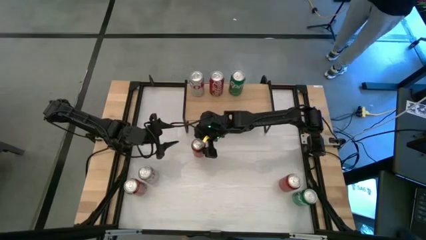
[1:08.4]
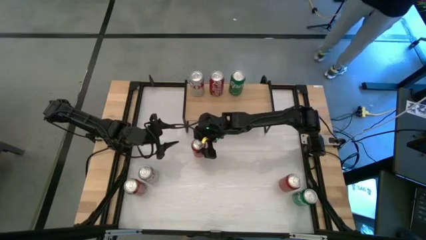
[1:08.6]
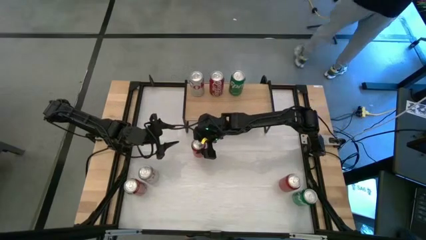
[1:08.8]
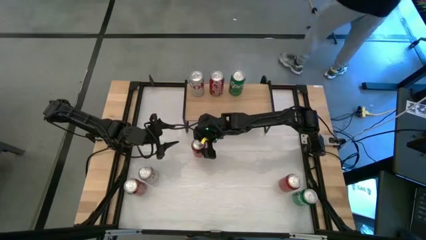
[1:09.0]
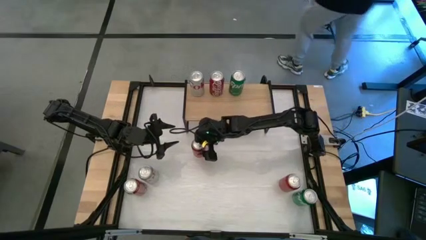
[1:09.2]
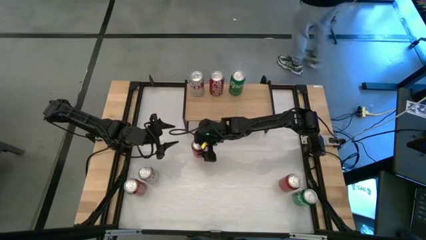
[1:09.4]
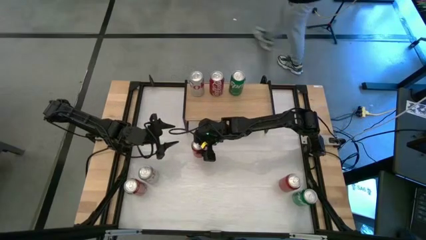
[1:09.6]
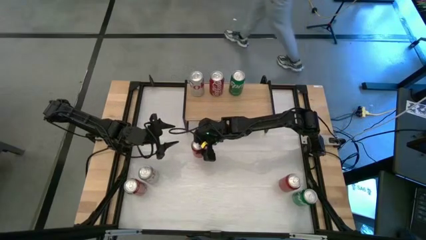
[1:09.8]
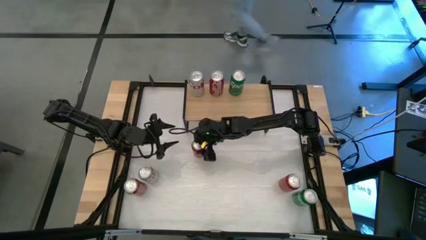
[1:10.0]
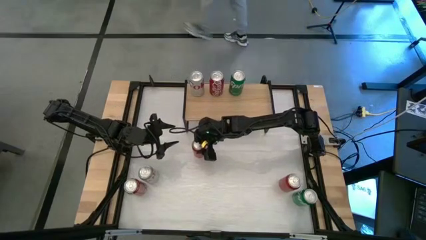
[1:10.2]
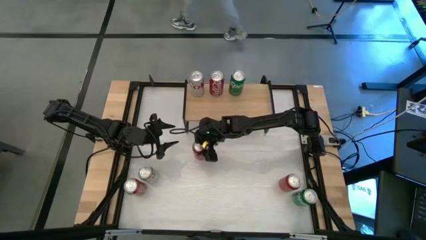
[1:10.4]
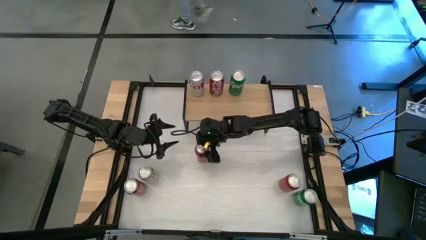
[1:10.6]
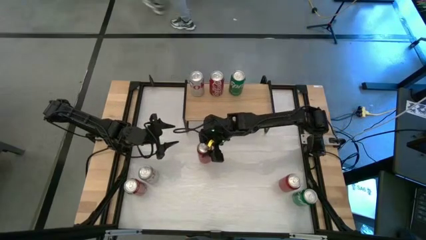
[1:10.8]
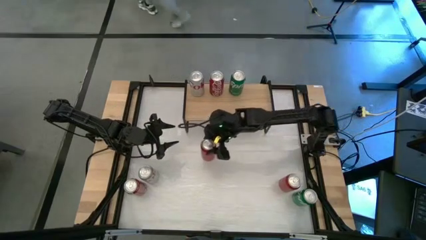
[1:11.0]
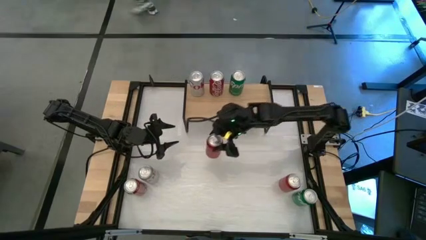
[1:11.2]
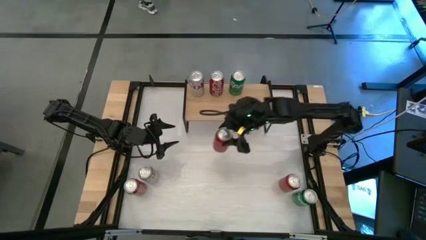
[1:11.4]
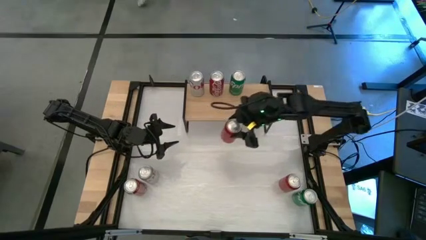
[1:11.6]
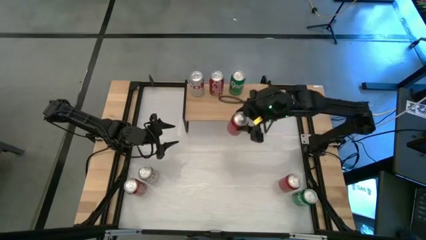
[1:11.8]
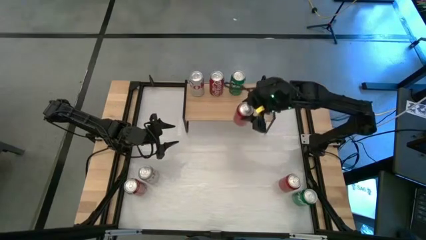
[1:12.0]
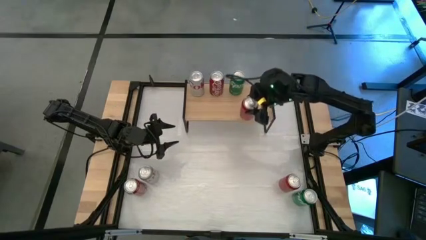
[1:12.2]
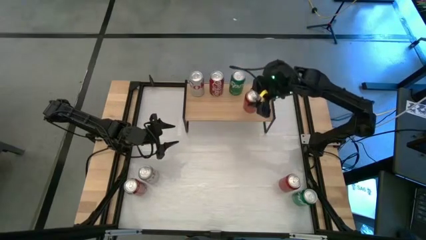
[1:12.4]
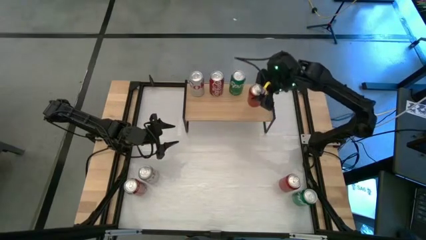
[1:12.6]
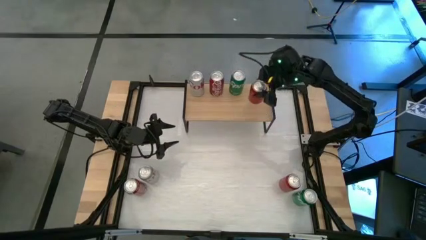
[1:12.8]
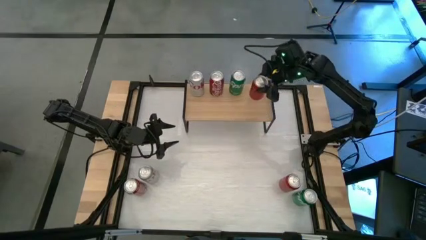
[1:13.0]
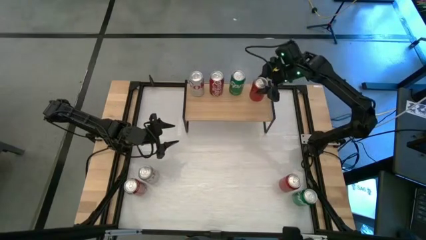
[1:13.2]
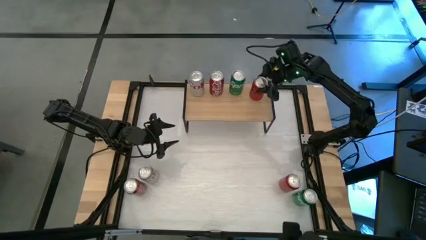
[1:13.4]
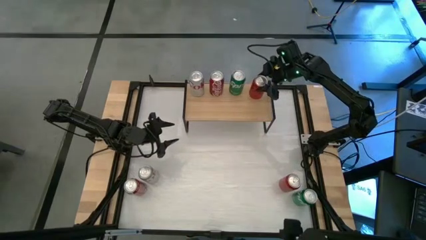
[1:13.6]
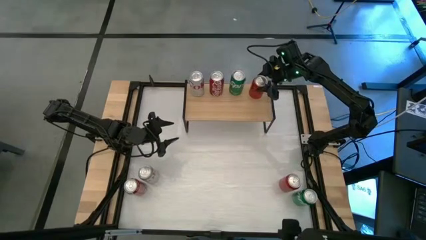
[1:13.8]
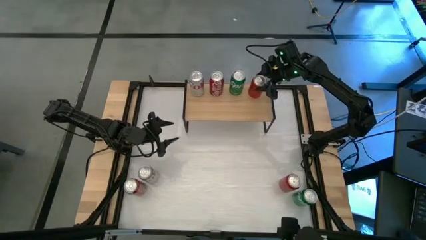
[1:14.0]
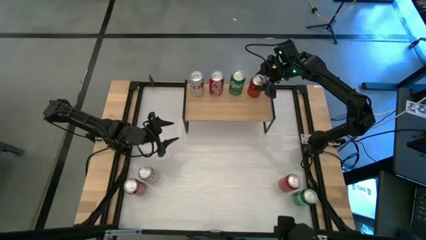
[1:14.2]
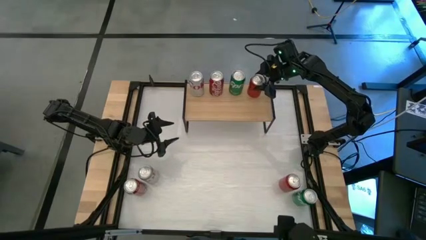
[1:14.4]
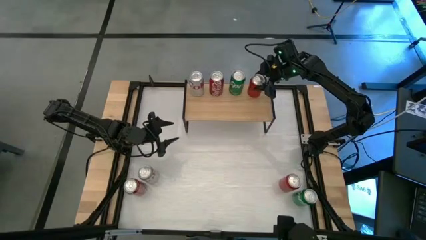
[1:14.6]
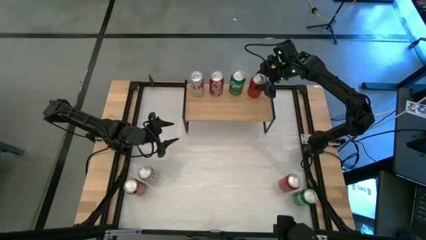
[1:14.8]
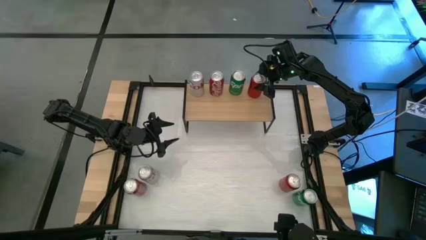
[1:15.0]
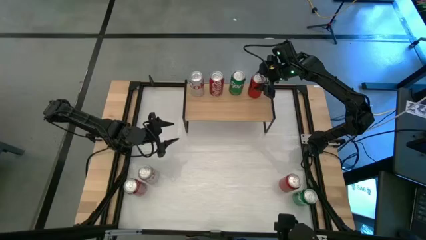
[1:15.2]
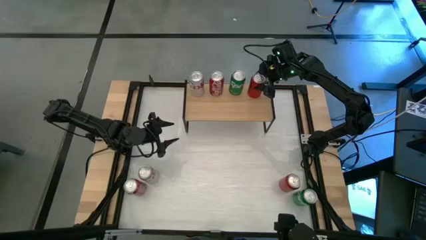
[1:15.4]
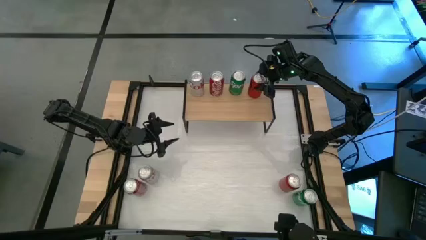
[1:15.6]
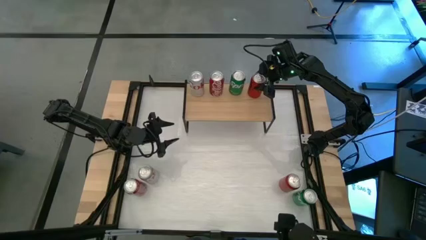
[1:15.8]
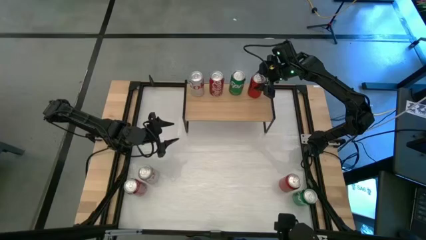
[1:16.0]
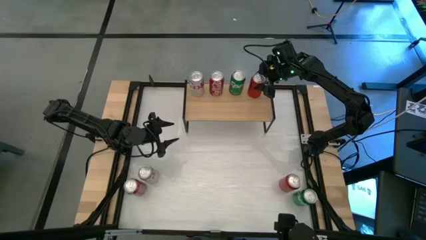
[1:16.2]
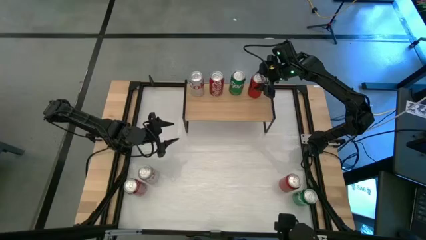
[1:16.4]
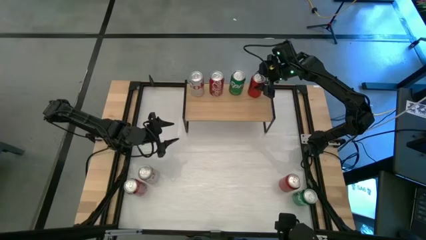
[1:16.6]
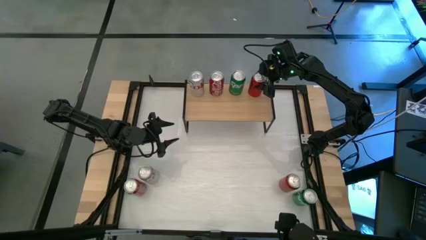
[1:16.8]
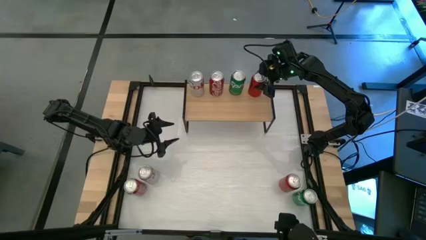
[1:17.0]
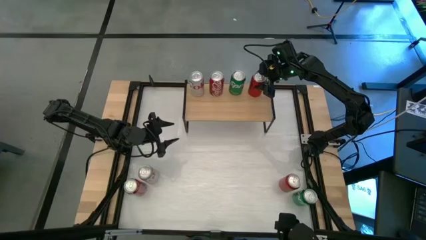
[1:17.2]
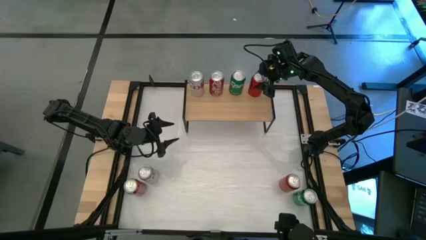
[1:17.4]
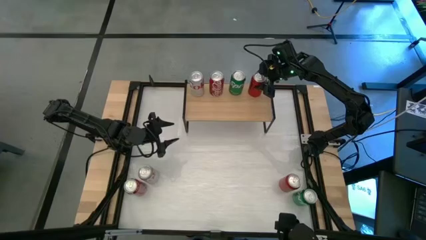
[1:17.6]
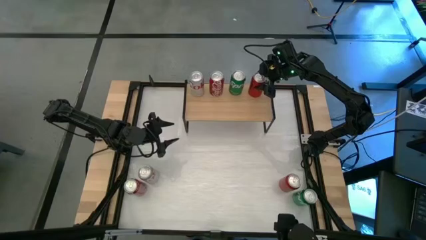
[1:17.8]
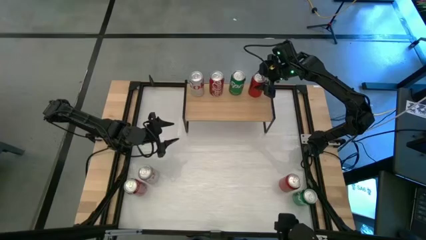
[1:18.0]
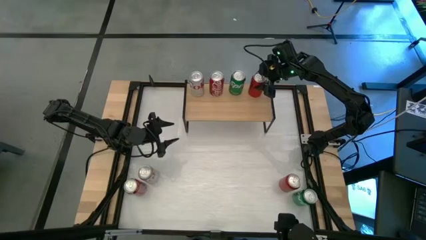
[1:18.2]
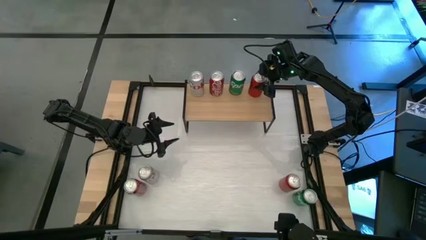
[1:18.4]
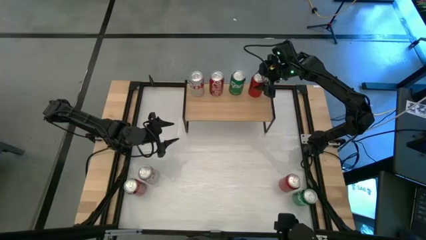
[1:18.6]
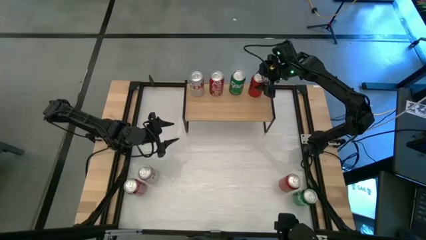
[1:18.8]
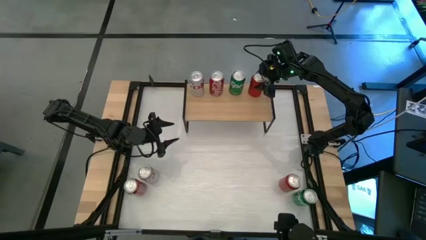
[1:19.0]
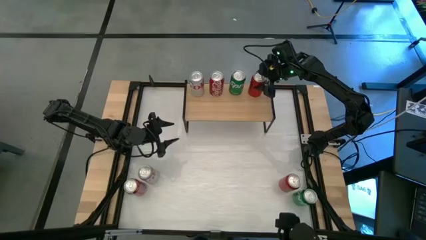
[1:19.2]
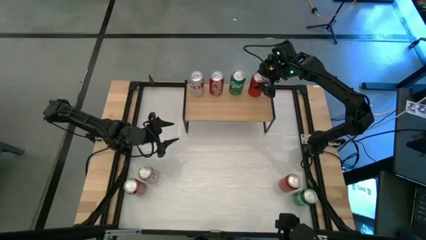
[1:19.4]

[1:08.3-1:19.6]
Task: Place canned beverage on shelf
Put the left red-black soda can on the shelf

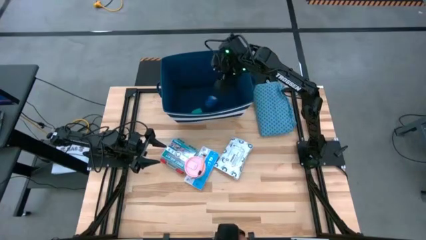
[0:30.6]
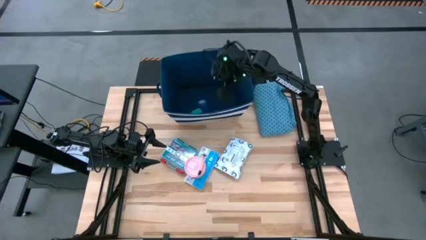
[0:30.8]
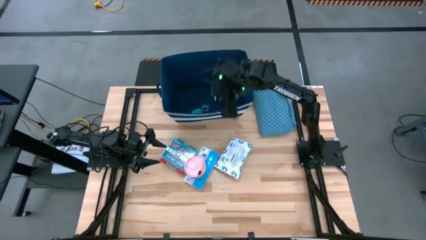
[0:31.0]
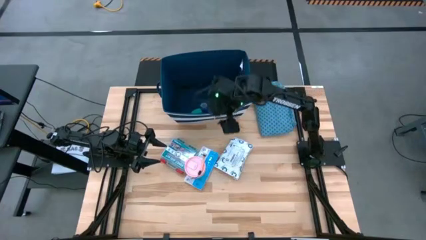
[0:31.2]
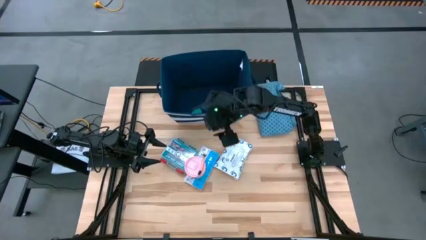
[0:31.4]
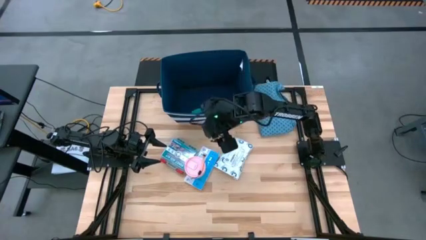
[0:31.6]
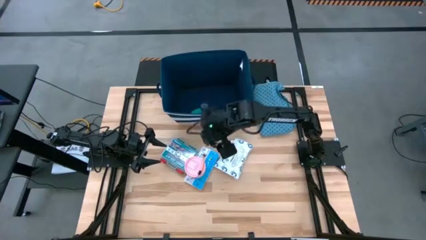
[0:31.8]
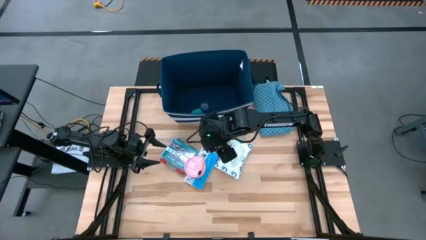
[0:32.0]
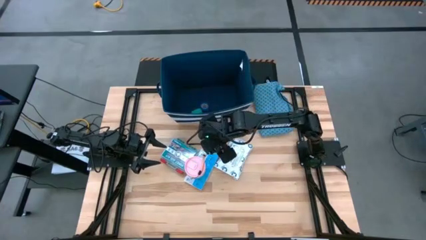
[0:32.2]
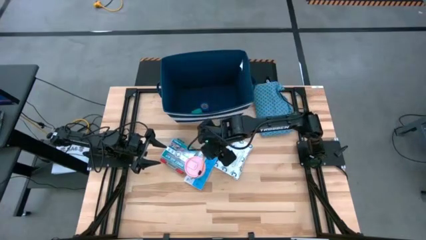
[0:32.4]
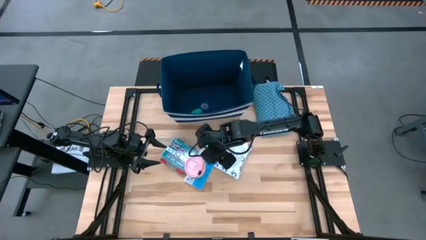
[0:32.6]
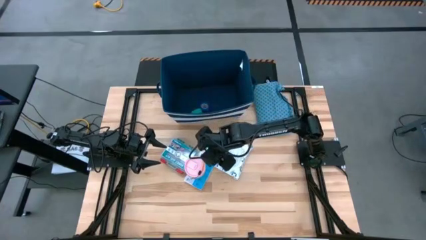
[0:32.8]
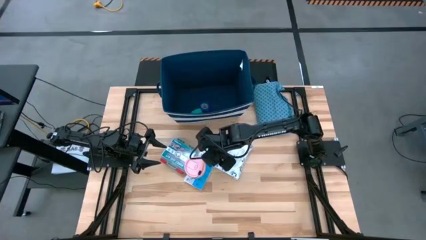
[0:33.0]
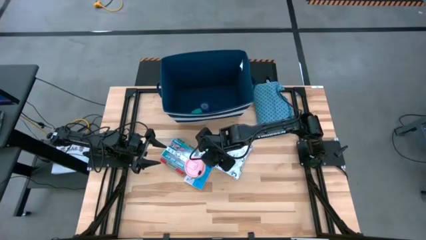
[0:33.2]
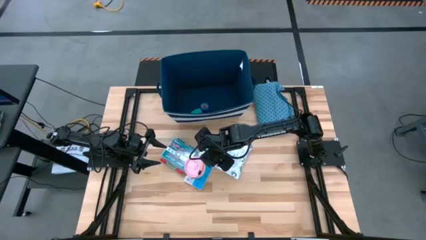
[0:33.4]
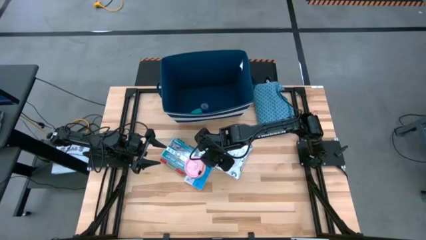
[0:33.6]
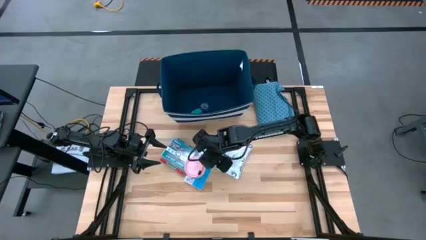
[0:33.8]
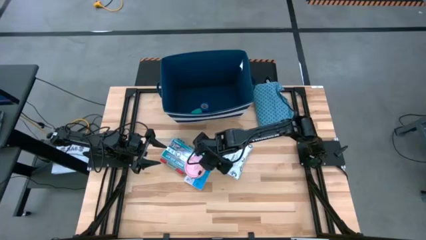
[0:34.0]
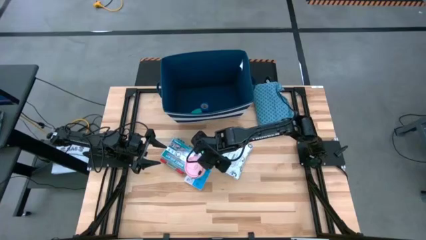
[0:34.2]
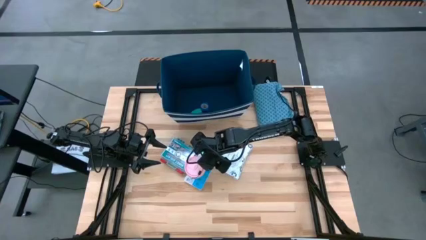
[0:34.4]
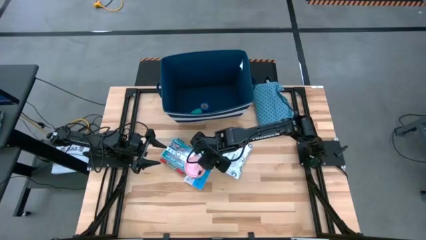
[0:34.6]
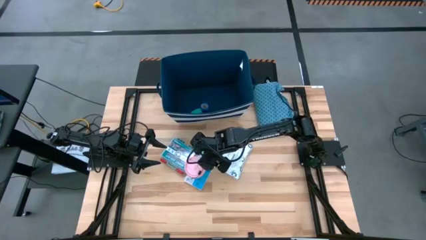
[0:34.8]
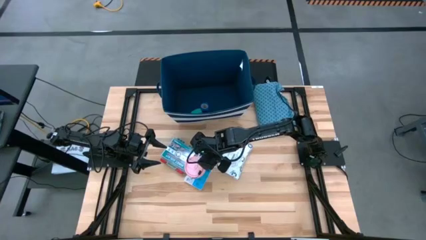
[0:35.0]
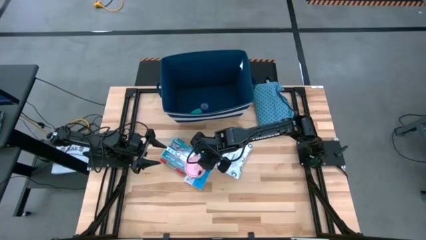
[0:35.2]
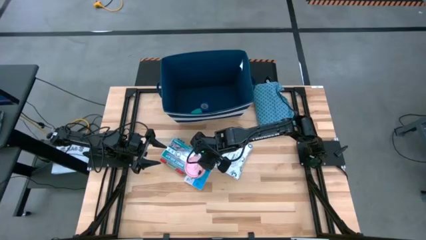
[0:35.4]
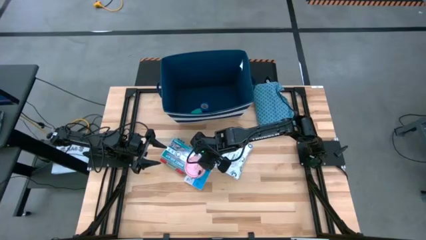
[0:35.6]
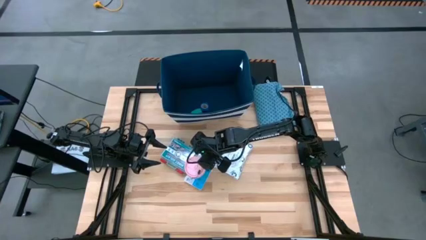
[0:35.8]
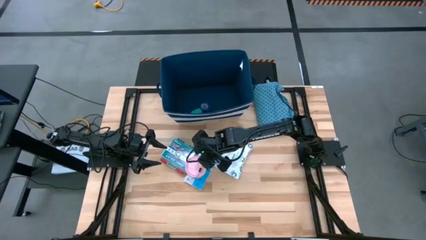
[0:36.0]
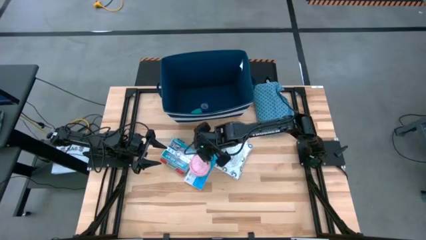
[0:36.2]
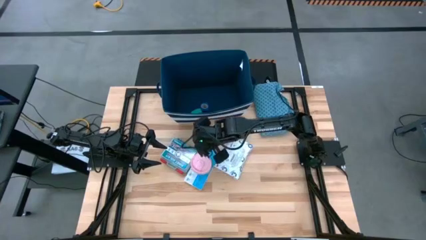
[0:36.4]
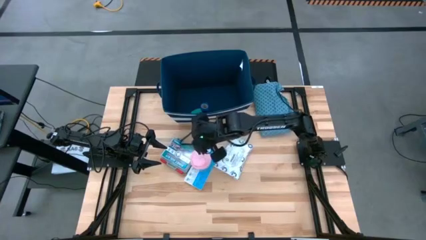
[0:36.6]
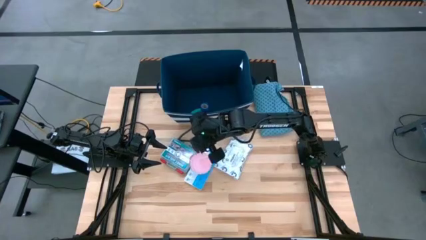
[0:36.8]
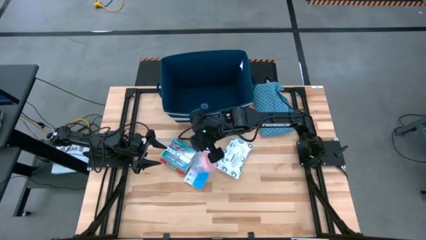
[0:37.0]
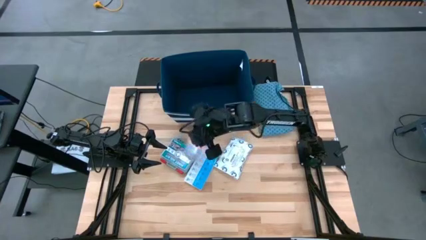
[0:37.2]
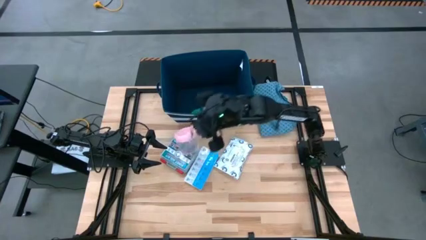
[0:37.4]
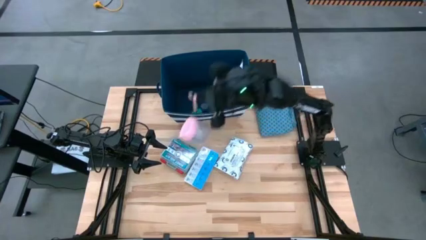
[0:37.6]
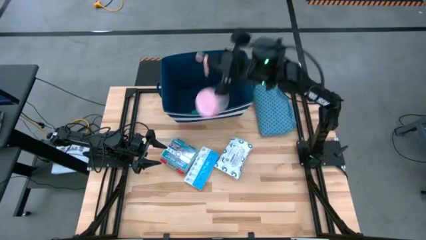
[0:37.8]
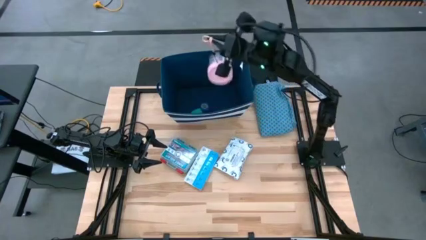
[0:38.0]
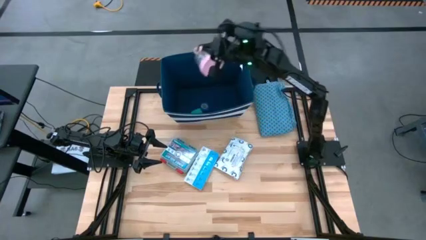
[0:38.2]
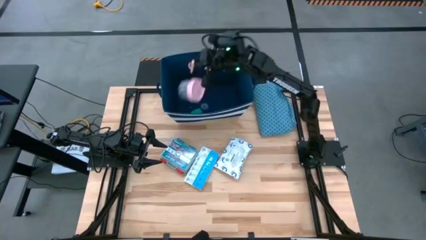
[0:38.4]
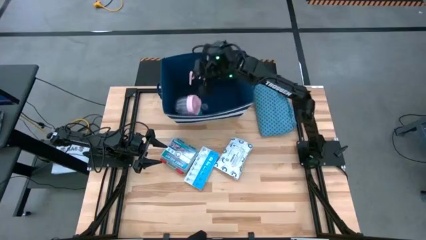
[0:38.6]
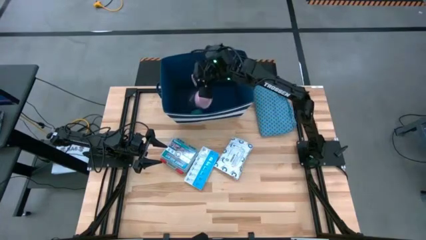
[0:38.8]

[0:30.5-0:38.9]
Task: Pack medical supplies into shirt
Put the pink water bottle into the blue patterned shirt
